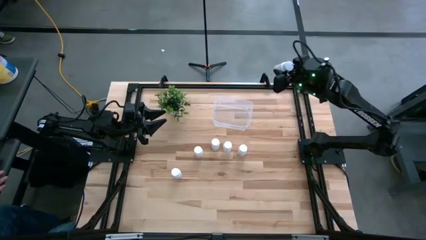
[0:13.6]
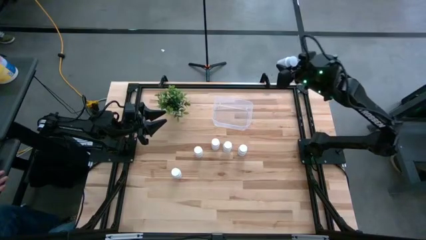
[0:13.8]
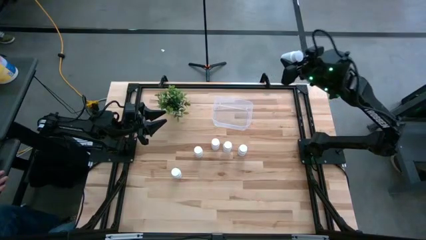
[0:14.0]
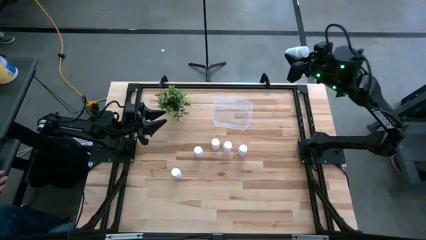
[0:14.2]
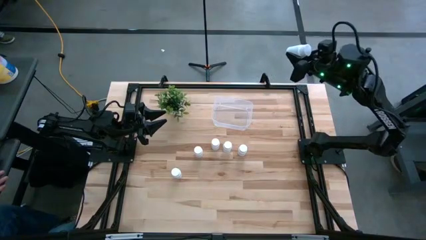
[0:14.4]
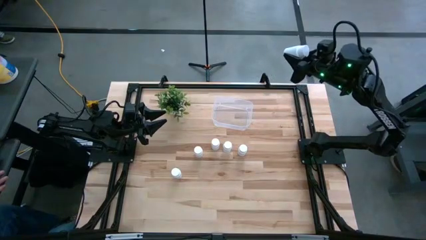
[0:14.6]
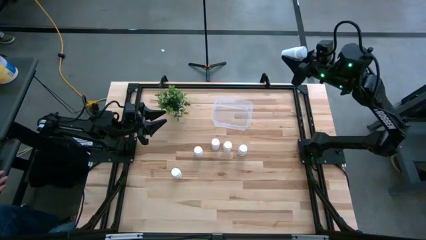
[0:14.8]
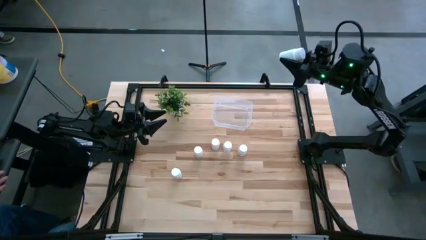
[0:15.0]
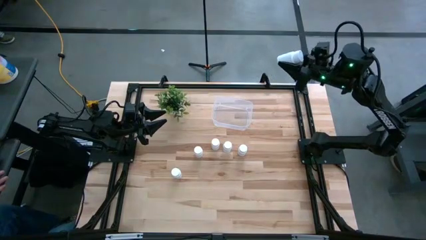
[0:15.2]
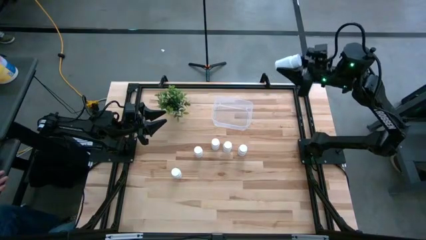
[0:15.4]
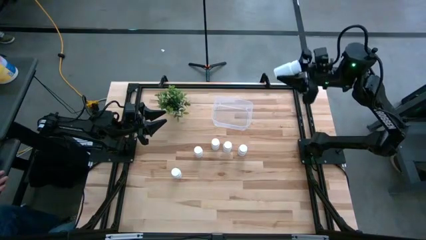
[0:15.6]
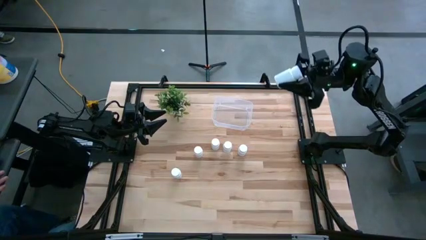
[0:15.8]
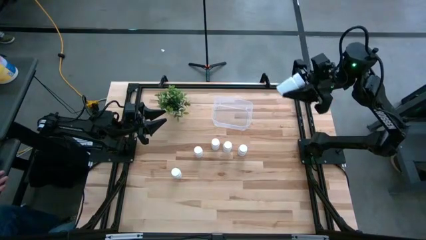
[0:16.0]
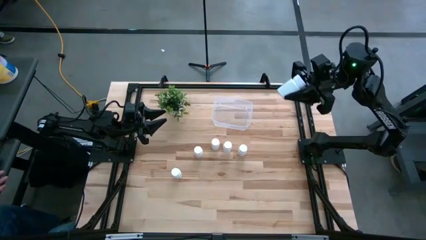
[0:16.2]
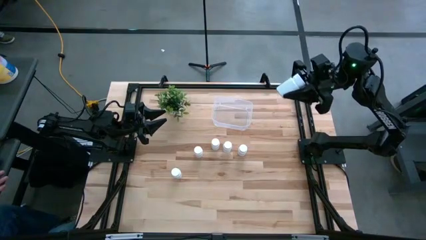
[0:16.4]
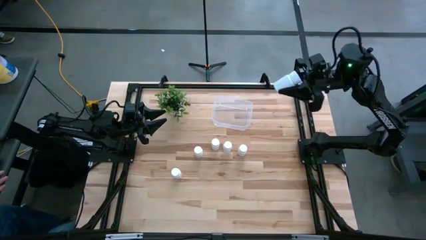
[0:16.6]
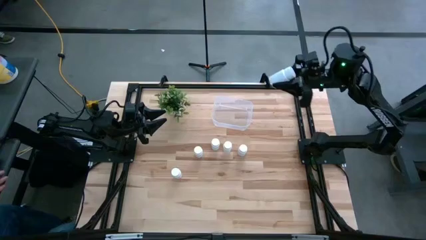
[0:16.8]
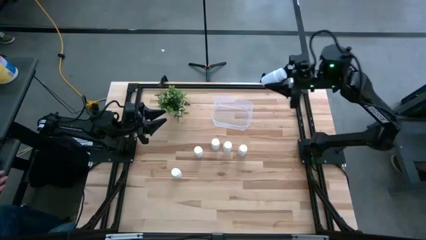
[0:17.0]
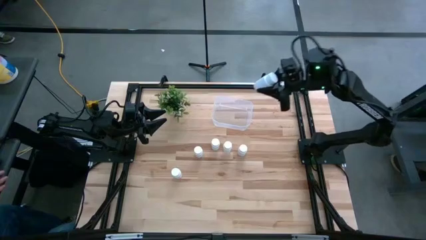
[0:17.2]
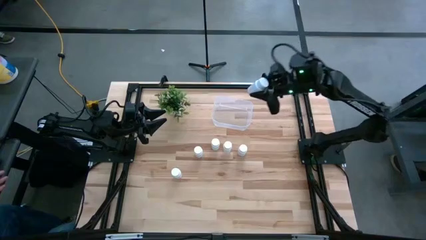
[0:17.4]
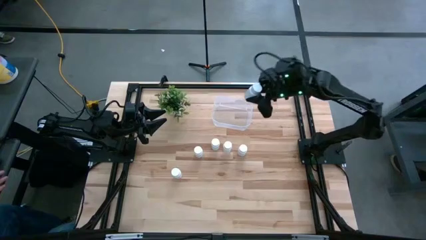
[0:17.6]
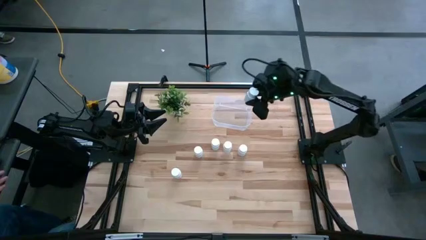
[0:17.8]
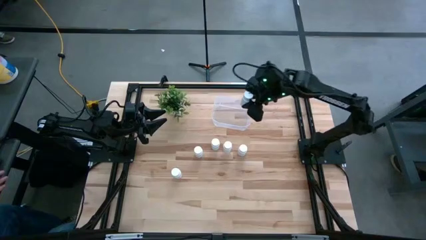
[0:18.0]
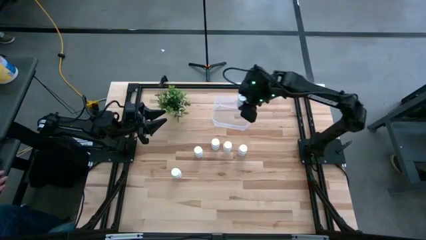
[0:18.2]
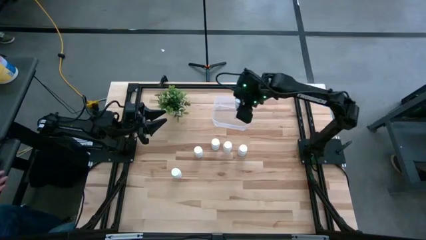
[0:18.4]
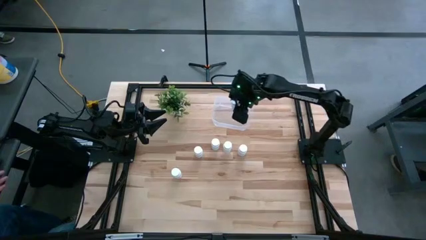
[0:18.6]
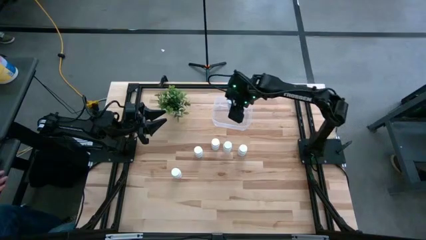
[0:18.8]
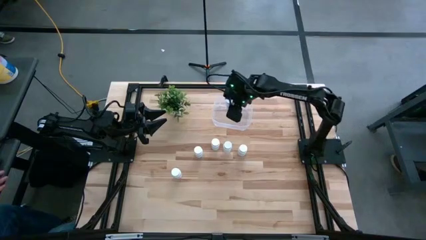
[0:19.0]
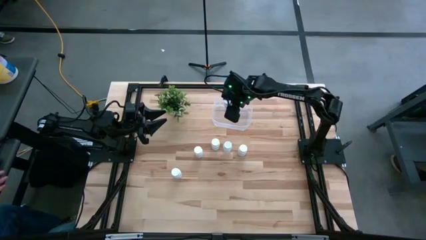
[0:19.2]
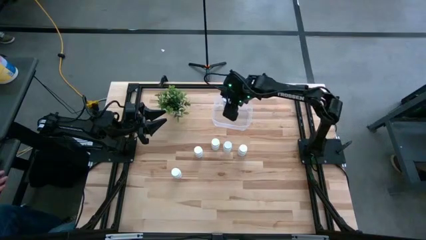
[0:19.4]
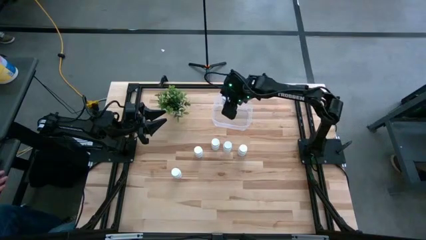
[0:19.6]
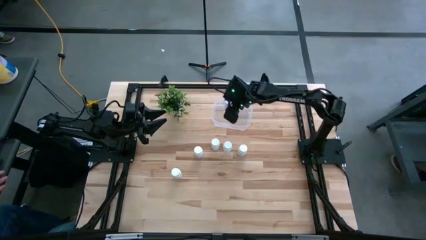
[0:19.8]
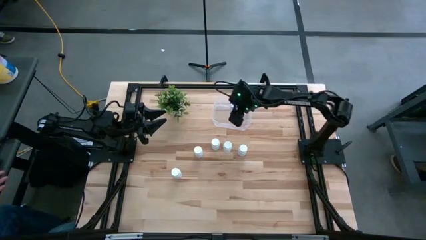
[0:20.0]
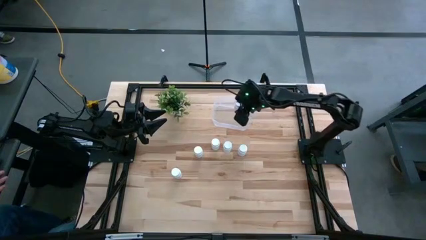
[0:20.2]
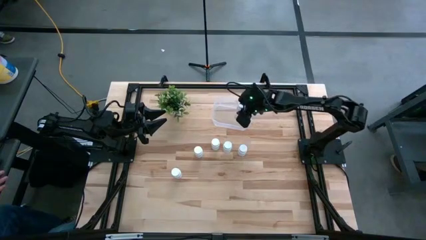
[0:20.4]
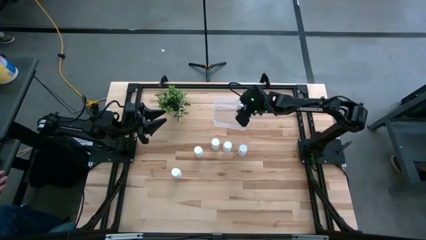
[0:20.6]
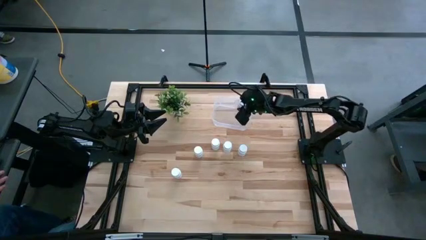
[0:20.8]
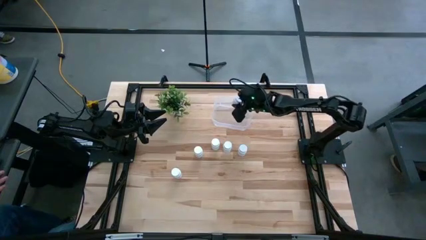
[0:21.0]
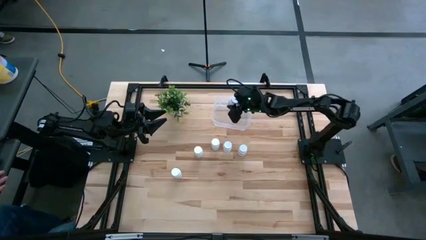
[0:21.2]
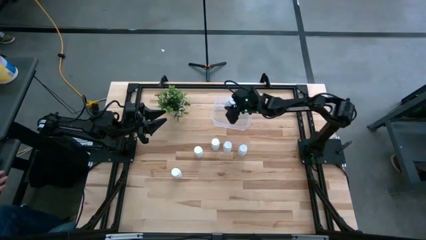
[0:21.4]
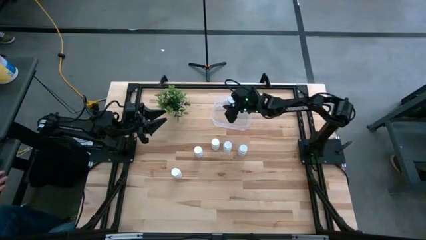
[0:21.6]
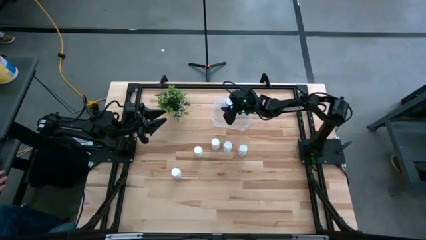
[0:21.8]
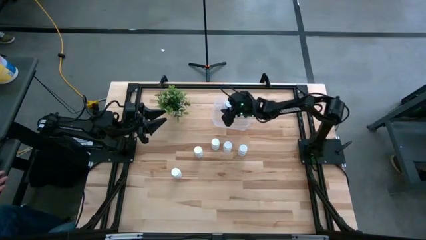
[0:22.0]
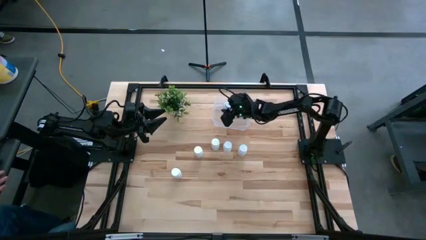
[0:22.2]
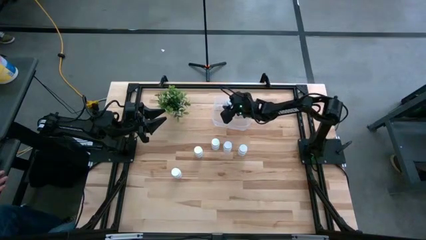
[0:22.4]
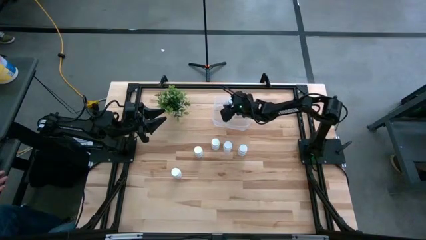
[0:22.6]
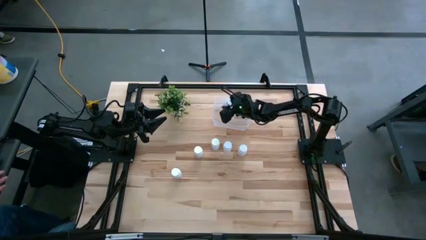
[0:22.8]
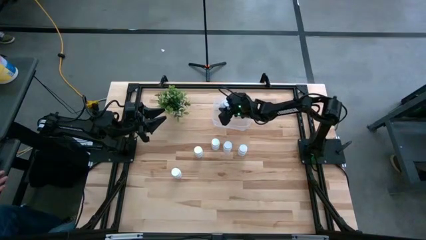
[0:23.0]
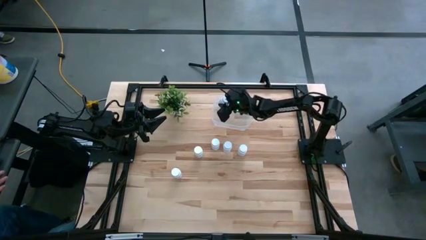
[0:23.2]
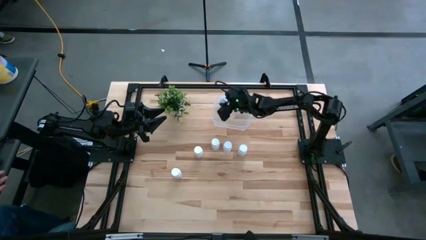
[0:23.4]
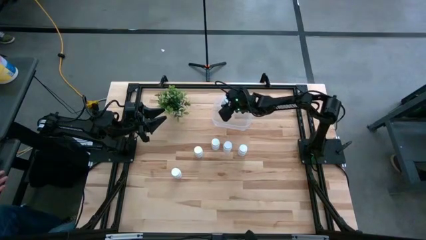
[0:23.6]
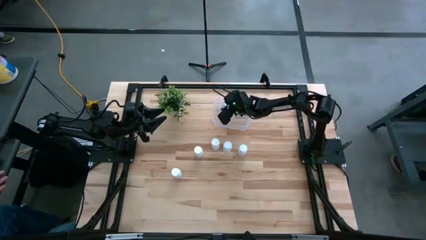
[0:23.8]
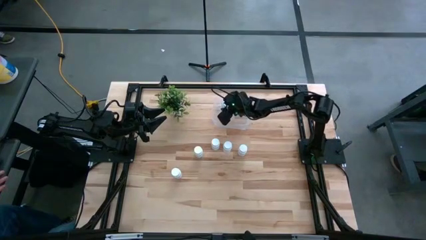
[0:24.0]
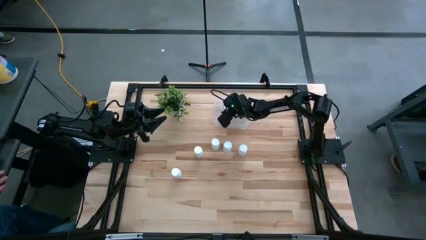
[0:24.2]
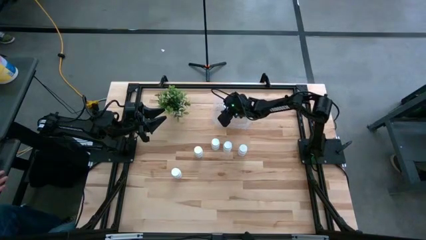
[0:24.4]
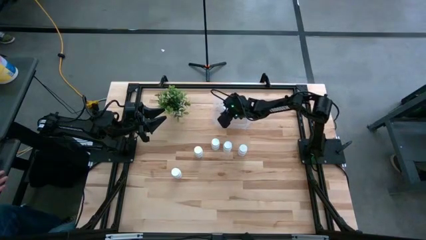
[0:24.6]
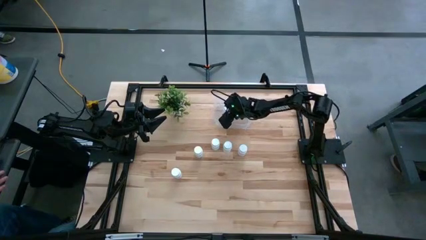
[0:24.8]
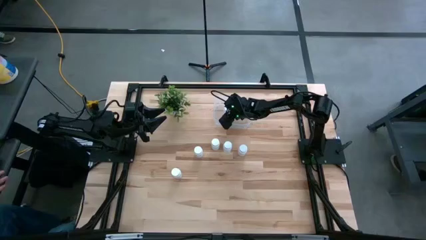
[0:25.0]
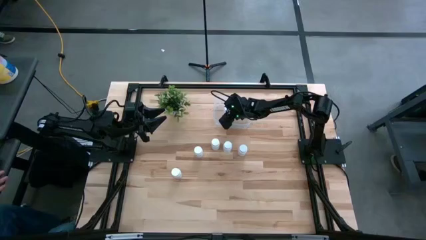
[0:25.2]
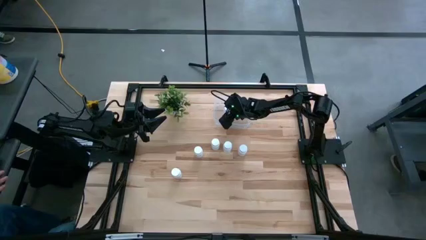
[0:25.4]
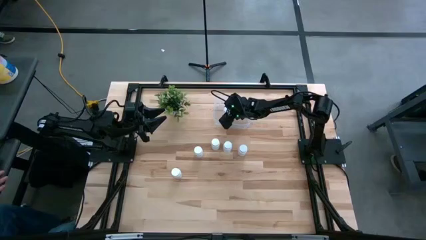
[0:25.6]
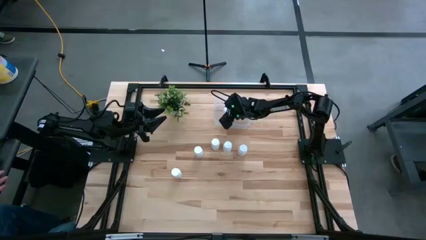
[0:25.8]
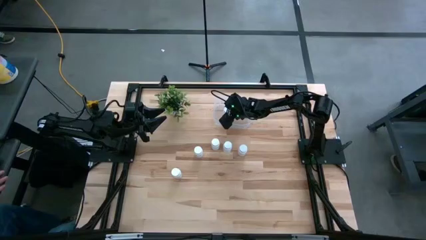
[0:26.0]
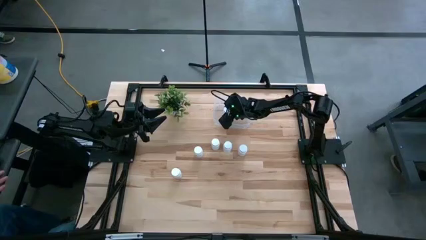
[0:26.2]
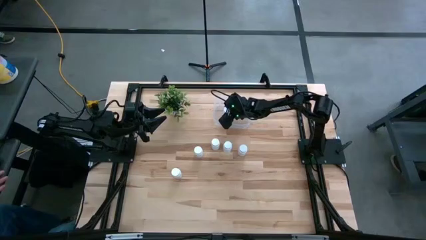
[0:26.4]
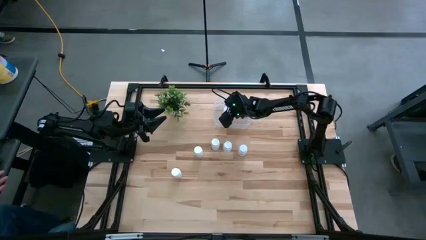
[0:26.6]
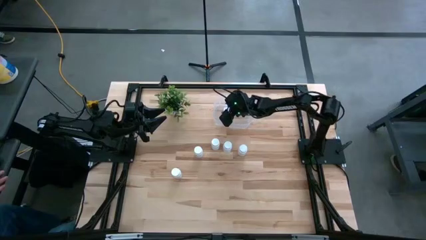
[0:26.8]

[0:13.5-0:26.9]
Task: Pick and place pill bottles into a basket
Put the white pill bottle into the transparent container
